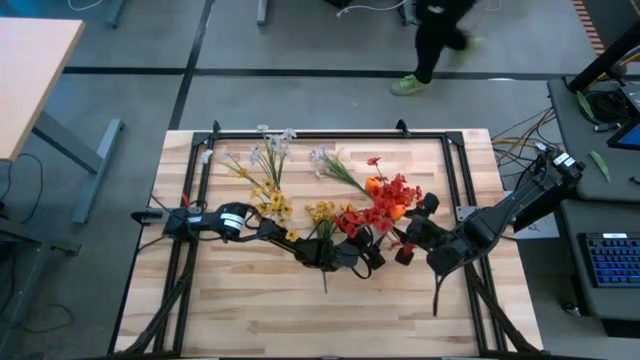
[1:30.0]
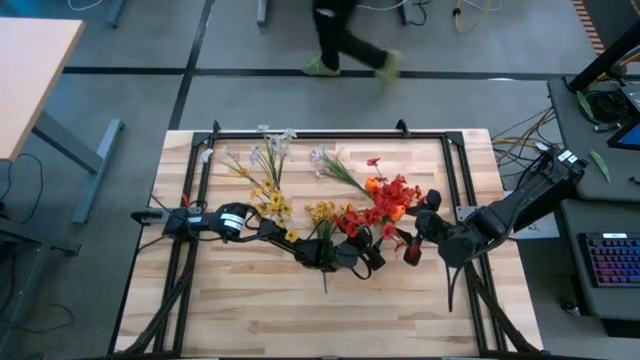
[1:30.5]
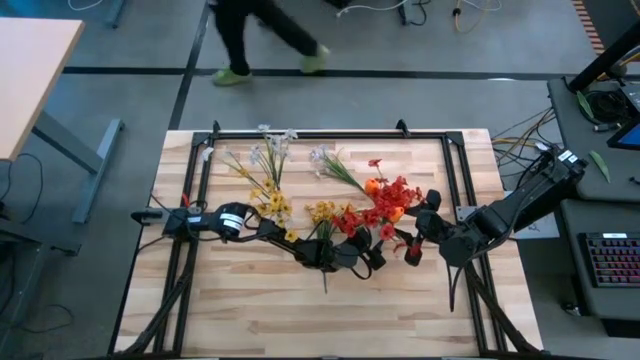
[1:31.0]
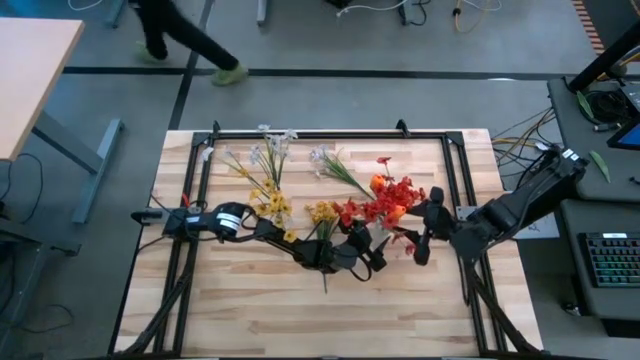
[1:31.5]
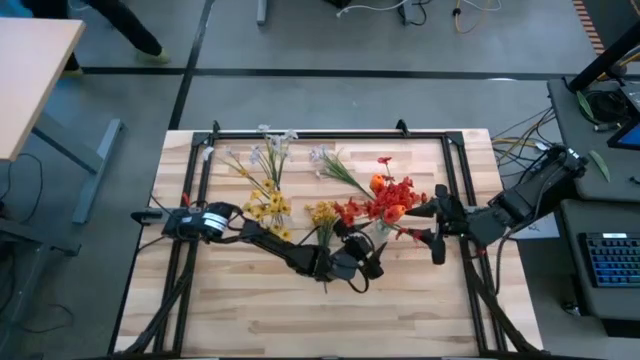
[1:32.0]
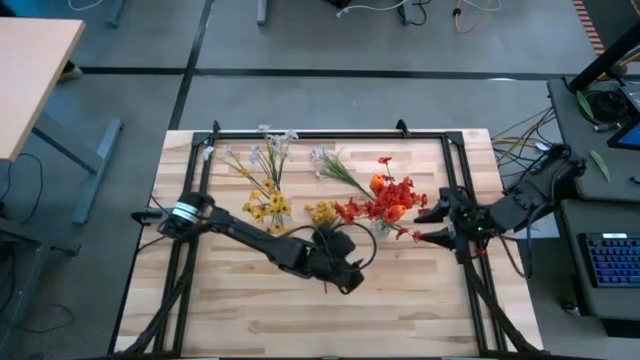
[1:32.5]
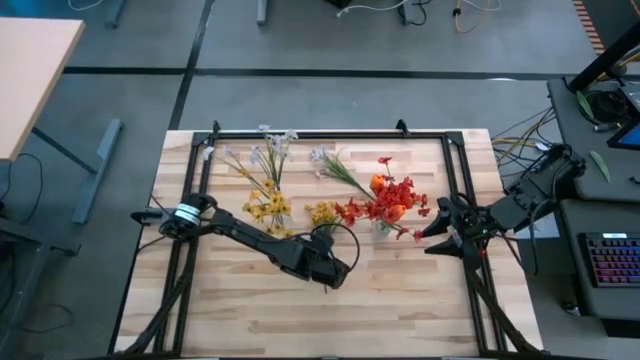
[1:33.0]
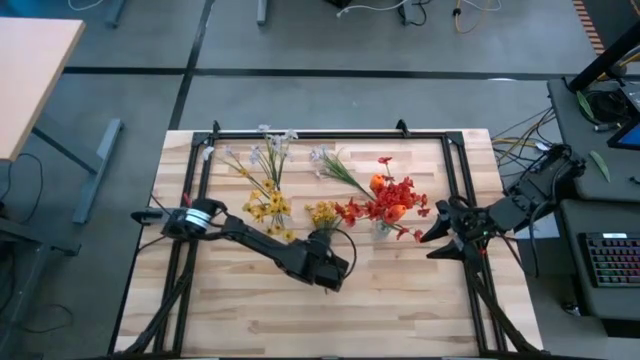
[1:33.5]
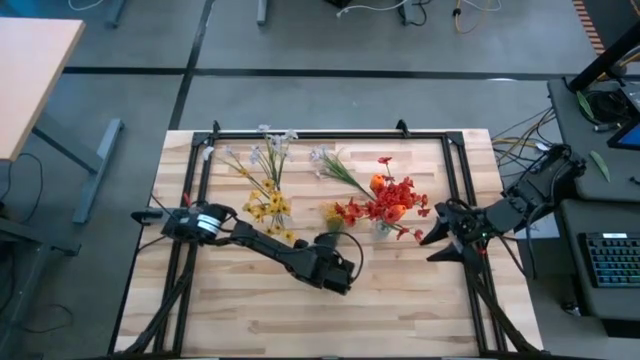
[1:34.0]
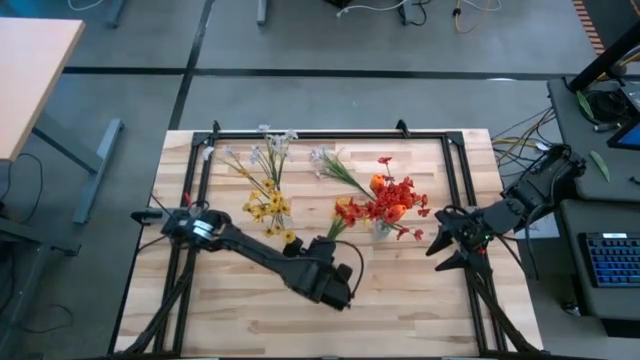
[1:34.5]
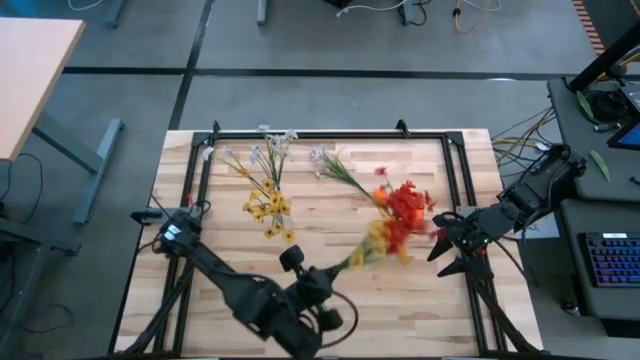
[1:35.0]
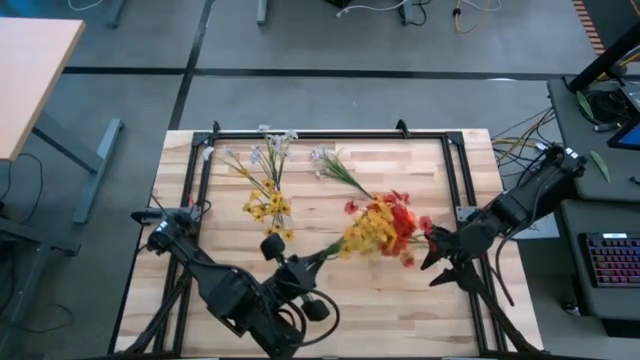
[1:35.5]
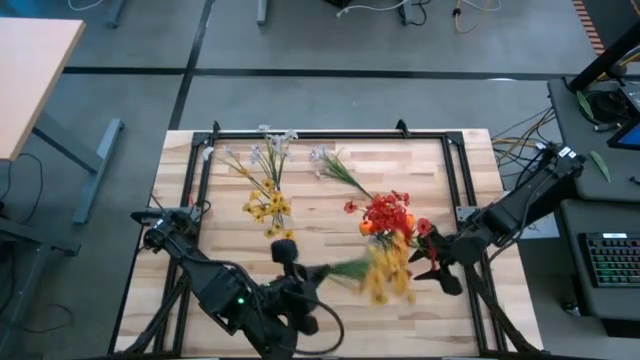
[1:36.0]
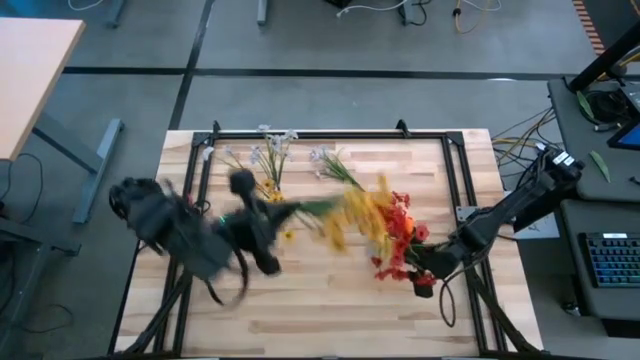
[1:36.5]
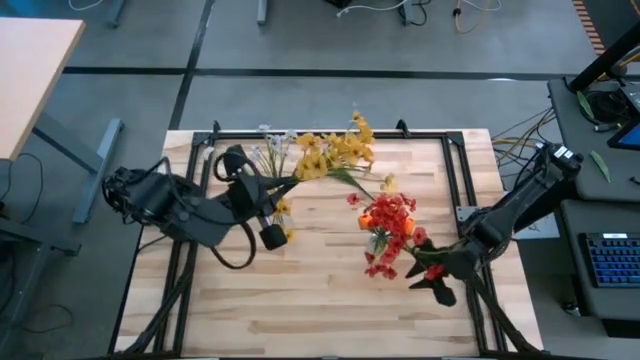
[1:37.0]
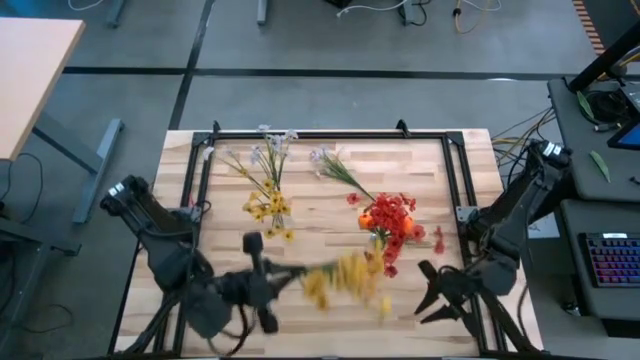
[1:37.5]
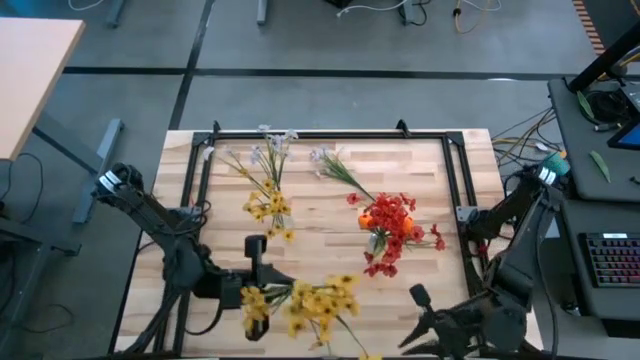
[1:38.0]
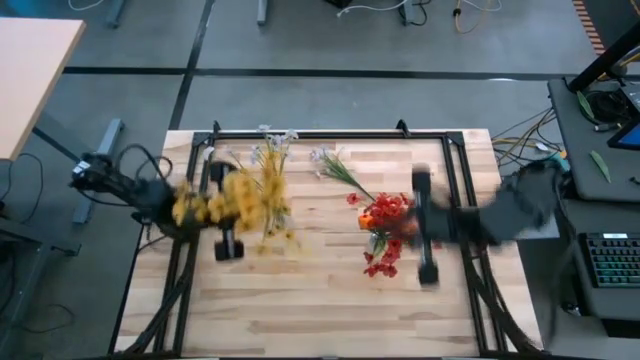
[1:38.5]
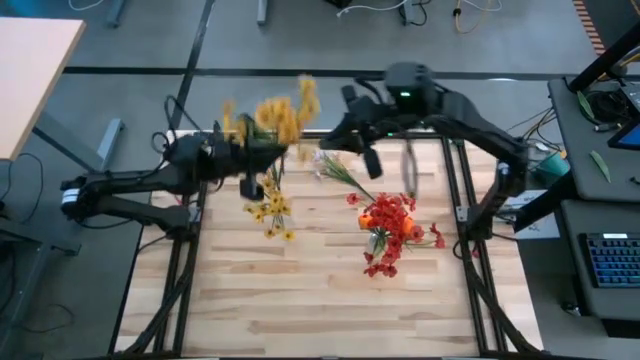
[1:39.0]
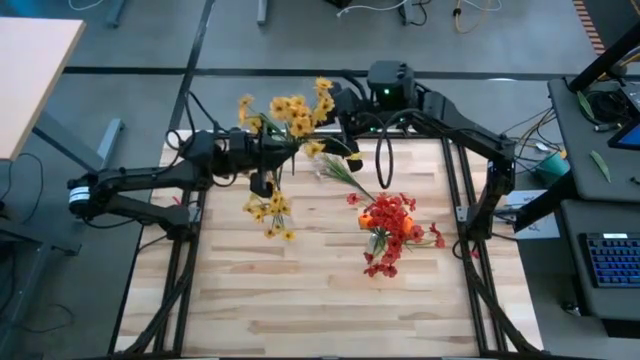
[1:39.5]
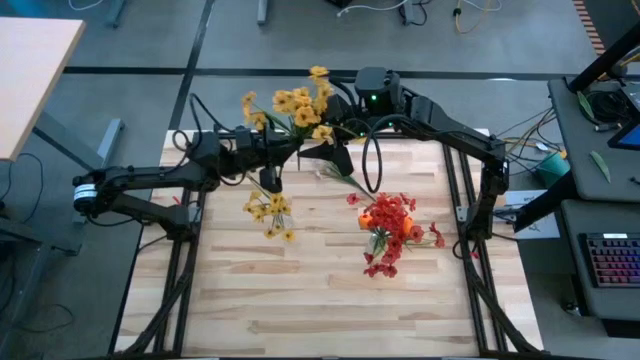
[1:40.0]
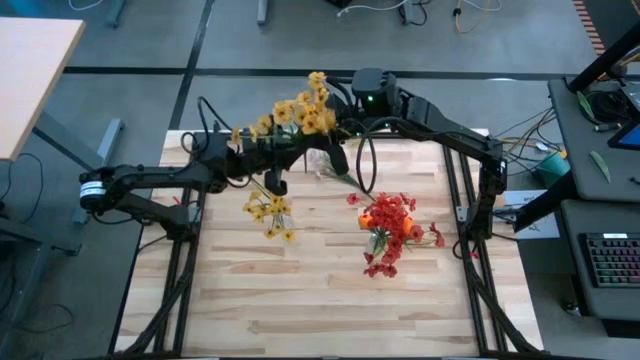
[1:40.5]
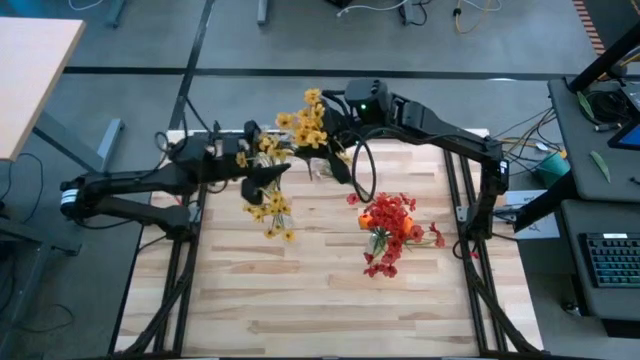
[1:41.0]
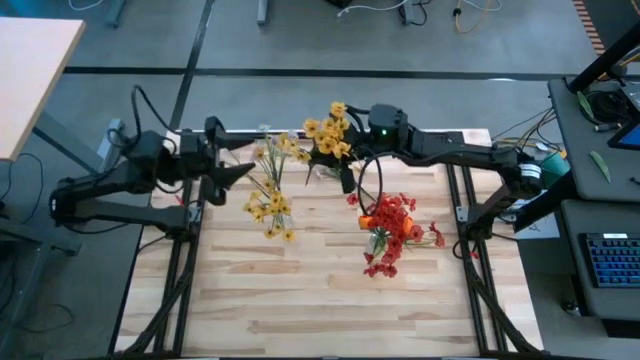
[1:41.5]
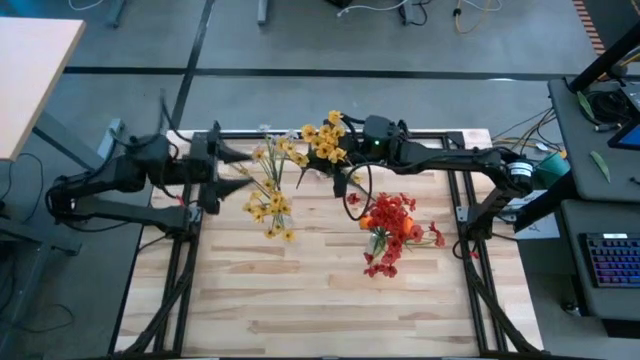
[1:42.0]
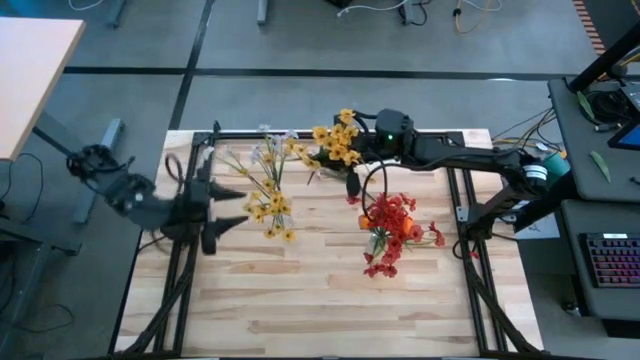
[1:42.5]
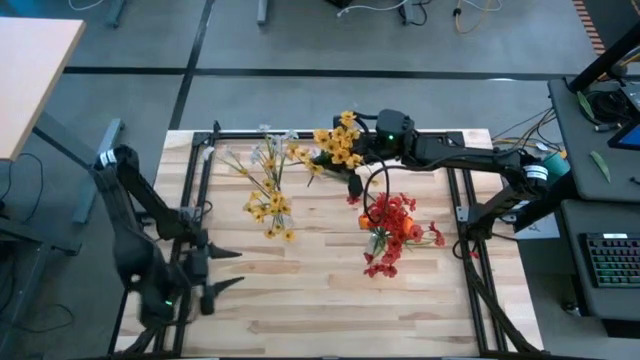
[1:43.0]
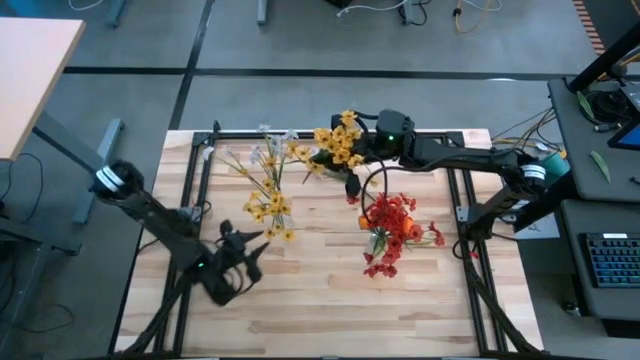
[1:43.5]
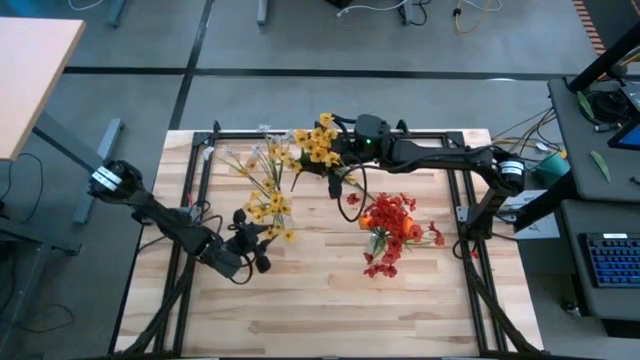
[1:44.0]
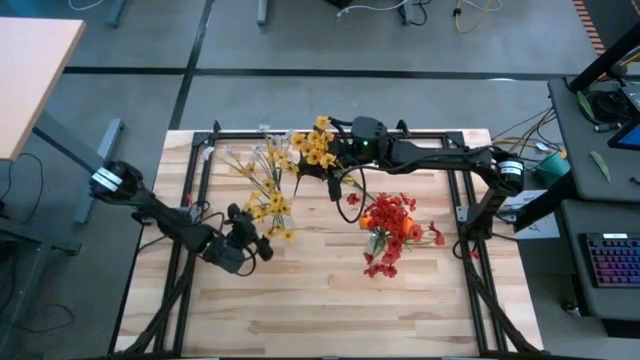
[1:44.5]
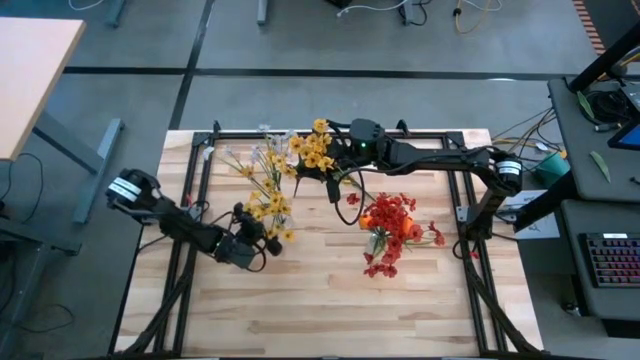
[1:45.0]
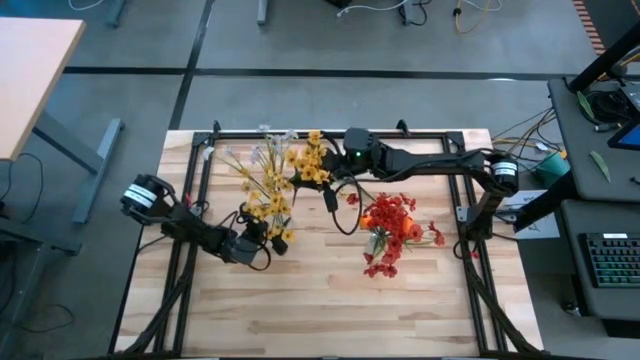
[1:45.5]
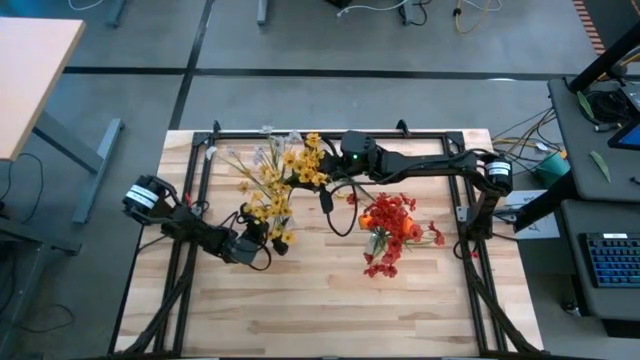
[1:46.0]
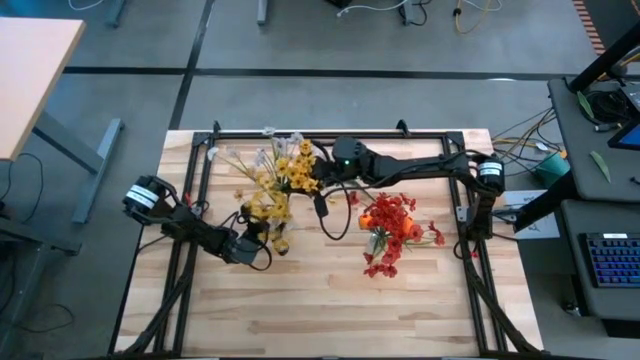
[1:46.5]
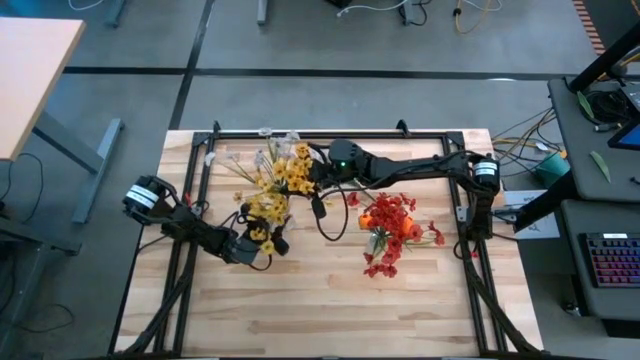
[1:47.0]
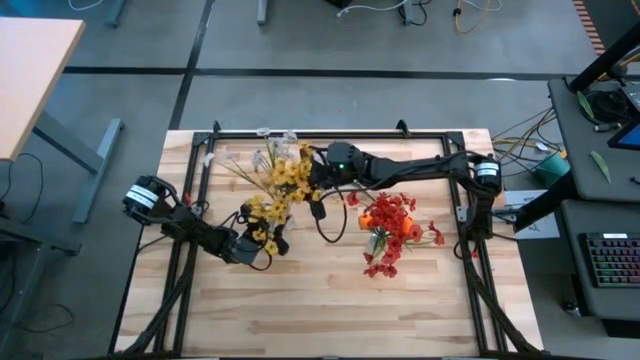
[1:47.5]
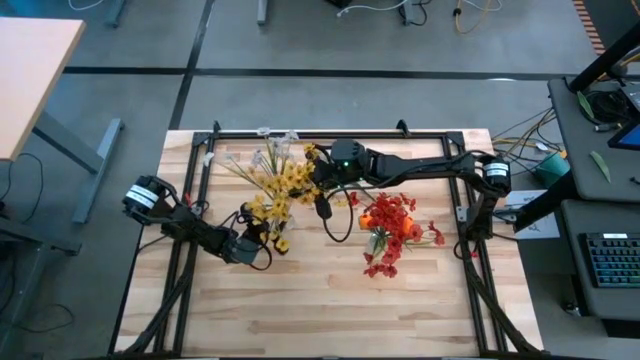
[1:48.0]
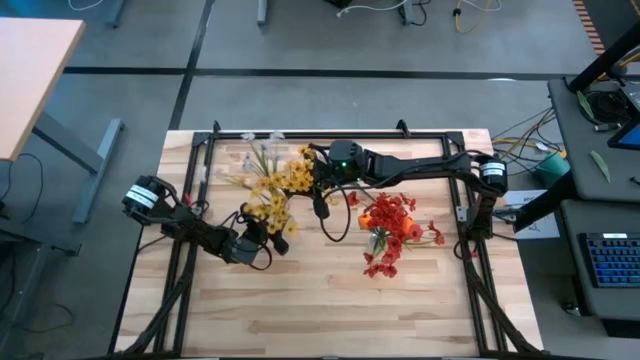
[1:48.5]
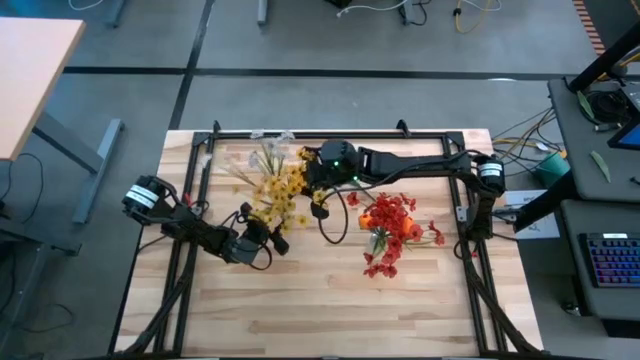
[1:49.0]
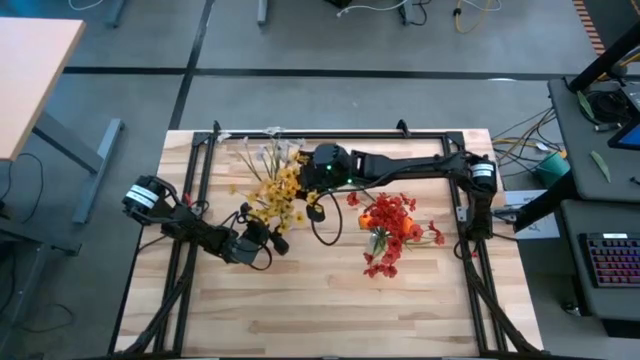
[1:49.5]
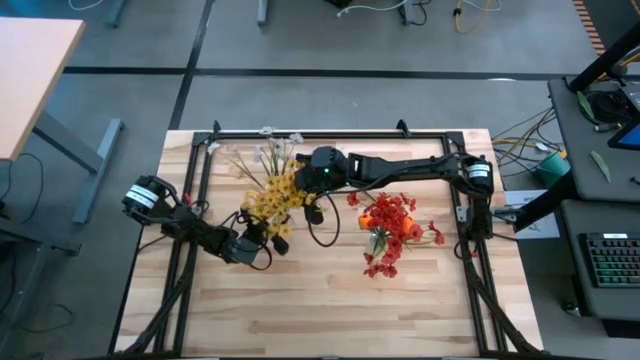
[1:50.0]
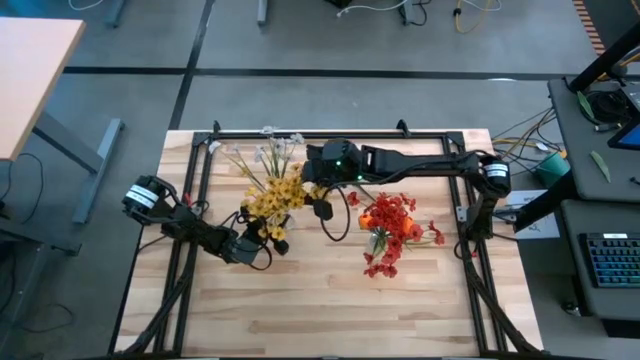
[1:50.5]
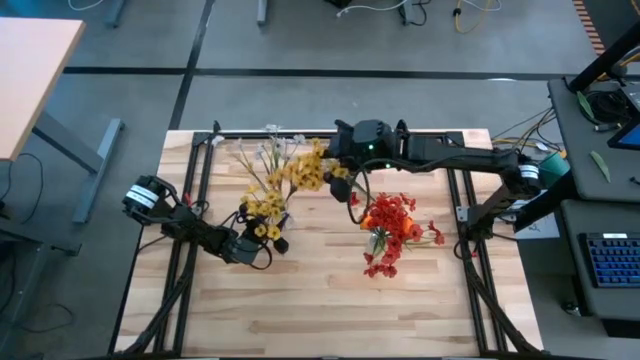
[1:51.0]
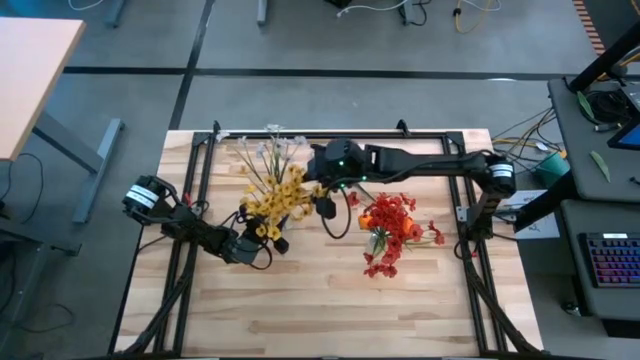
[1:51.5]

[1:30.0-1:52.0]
Task: Sort flowers into vase by color
Put the yellow flower into the left transparent vase

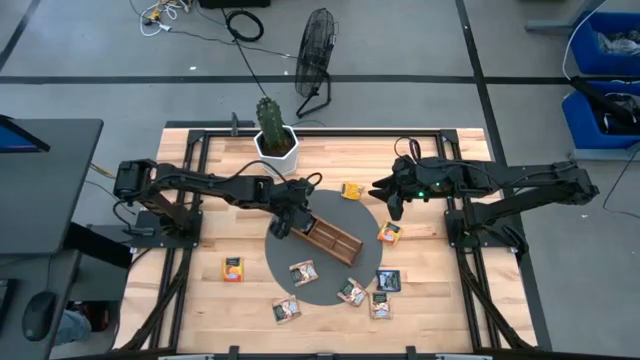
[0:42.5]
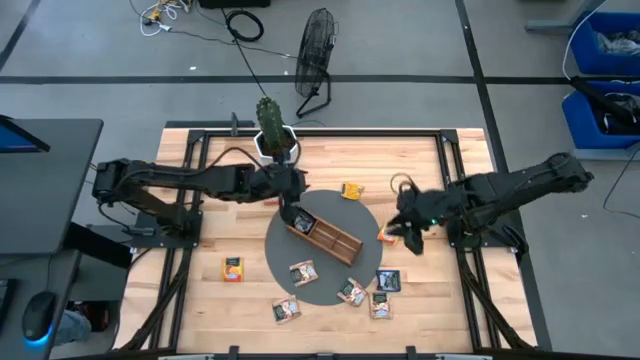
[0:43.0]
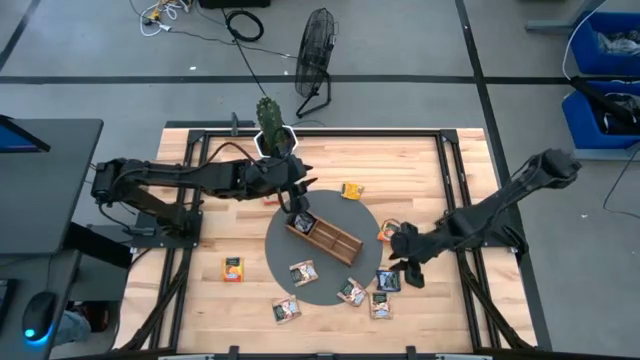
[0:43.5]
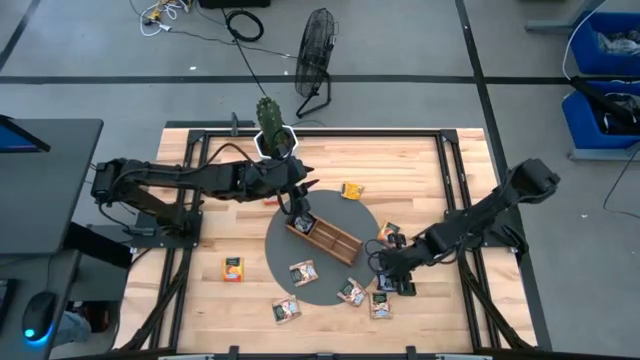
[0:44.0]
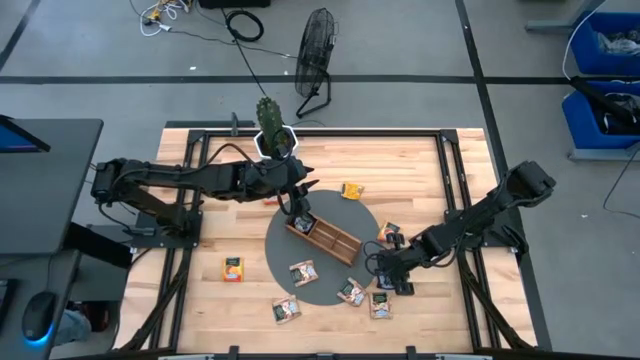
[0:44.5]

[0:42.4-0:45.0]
Task: Pick & Place Tea
Put the purple tea bag into the left section of the wooden organizer
